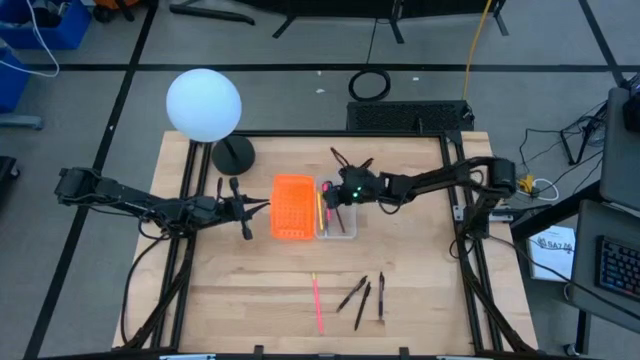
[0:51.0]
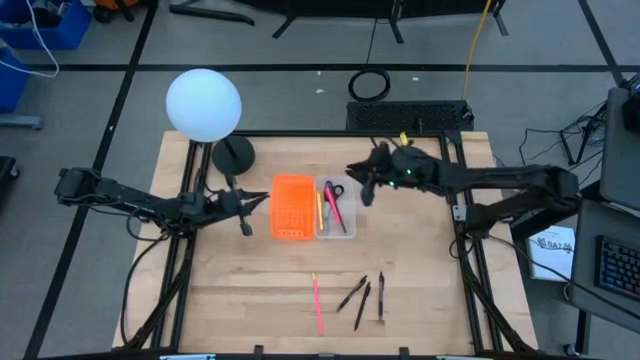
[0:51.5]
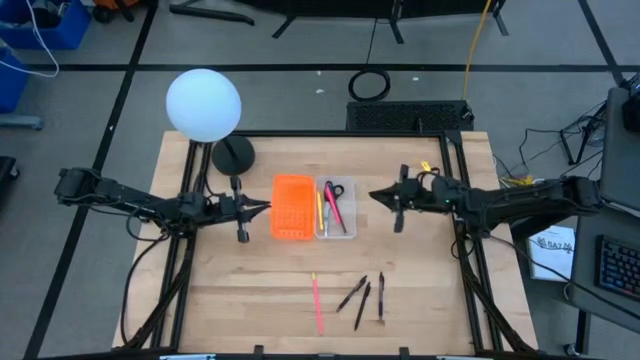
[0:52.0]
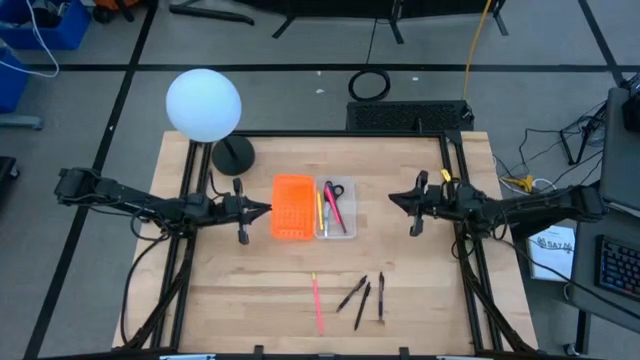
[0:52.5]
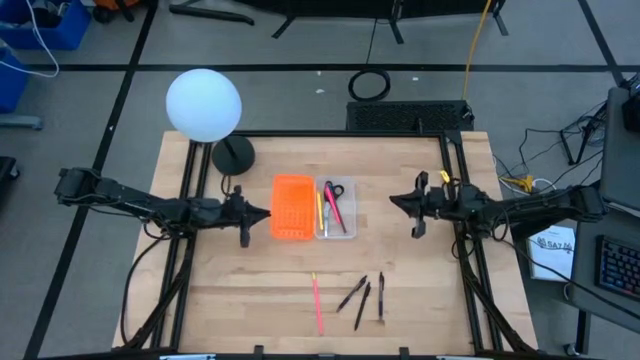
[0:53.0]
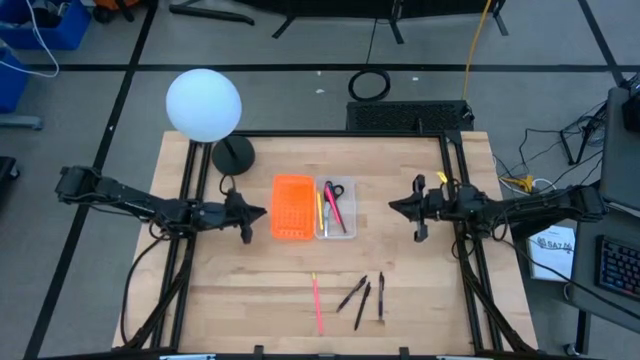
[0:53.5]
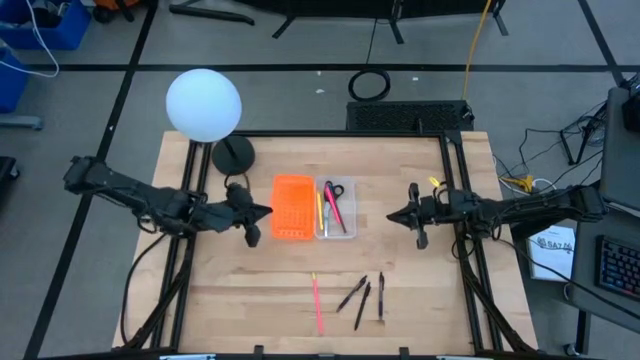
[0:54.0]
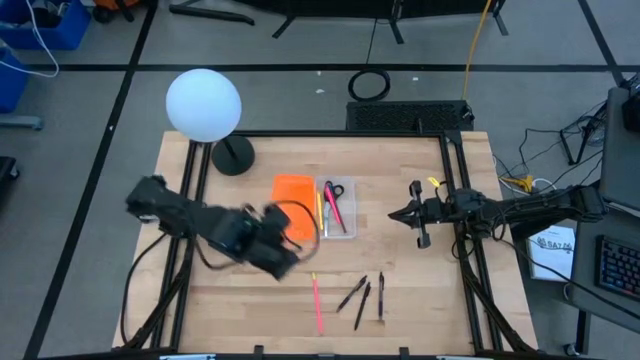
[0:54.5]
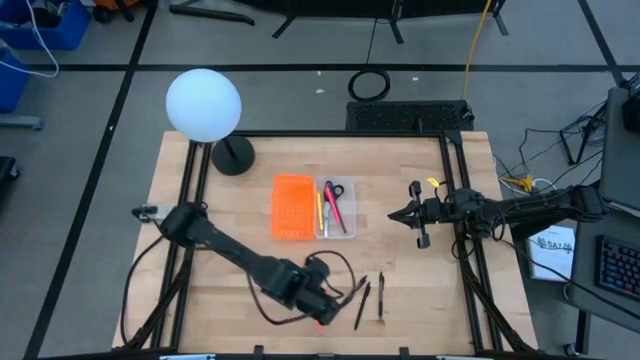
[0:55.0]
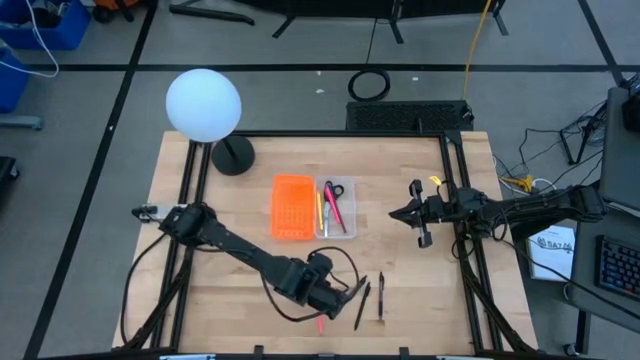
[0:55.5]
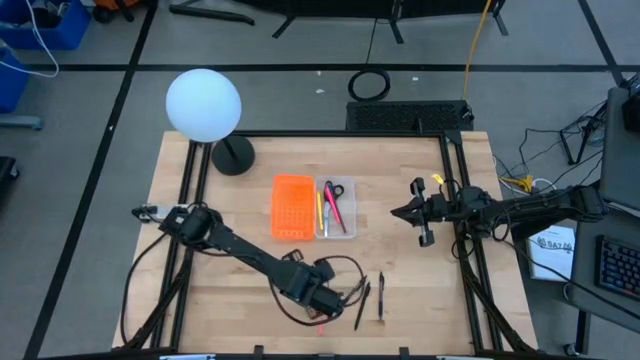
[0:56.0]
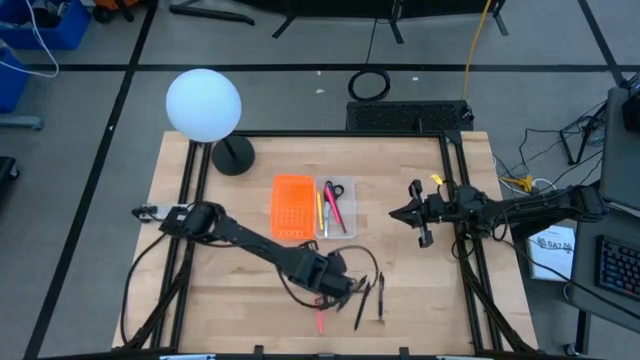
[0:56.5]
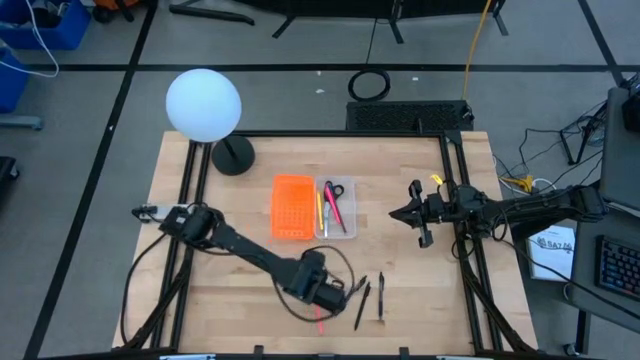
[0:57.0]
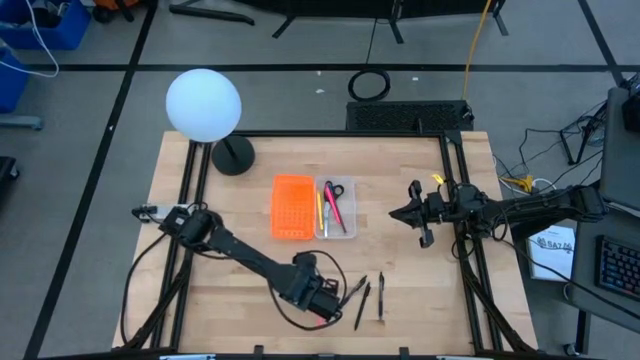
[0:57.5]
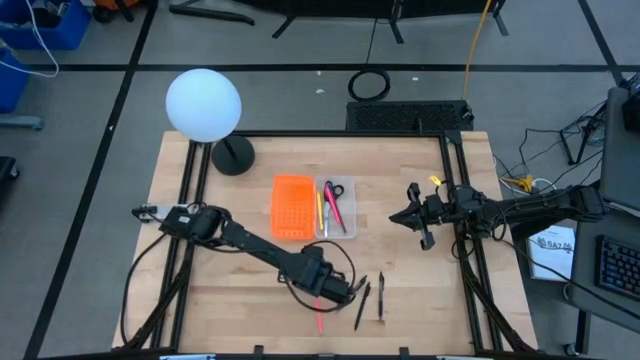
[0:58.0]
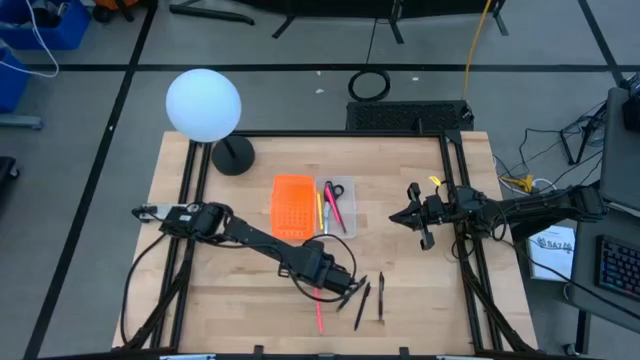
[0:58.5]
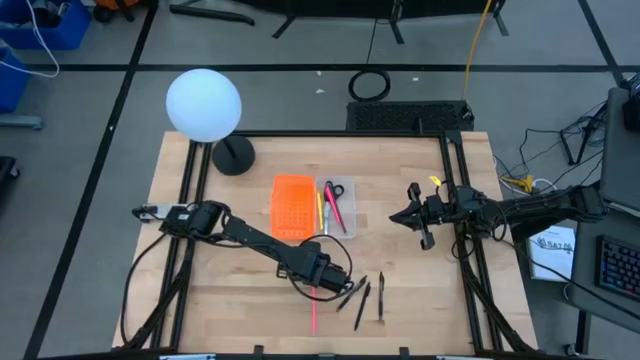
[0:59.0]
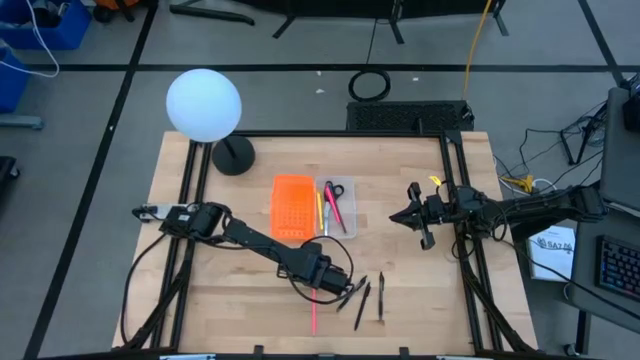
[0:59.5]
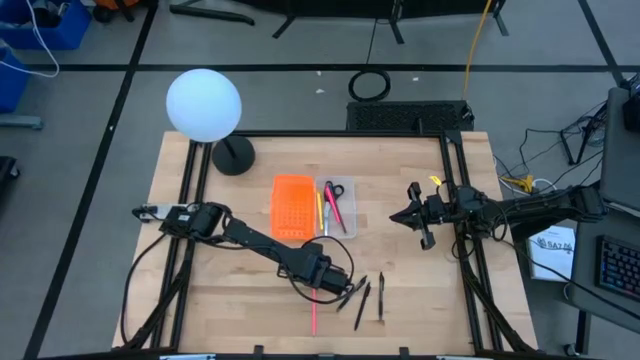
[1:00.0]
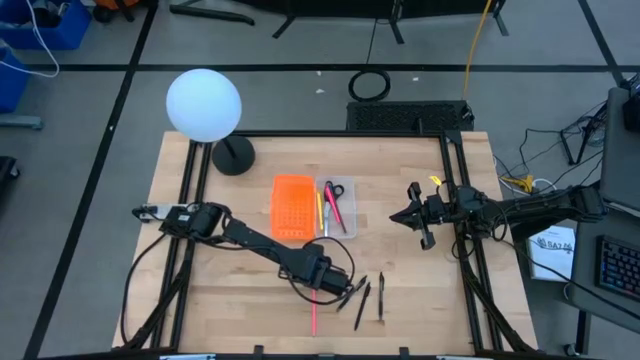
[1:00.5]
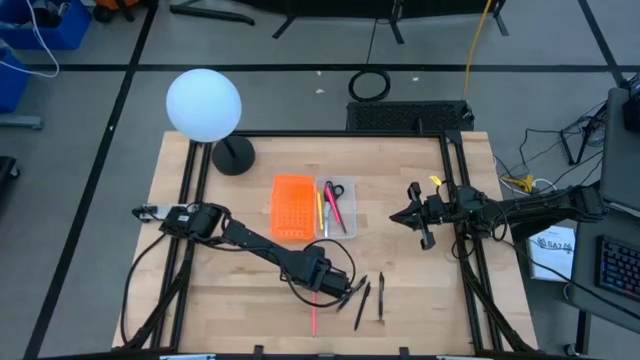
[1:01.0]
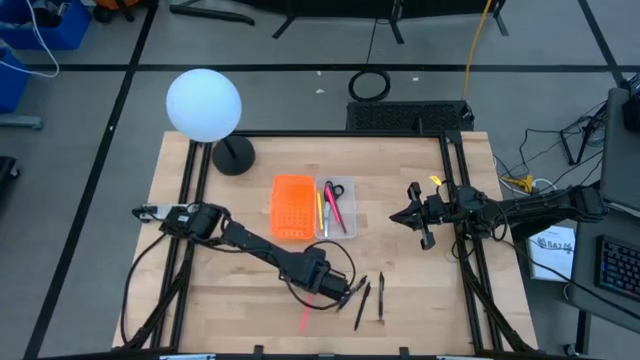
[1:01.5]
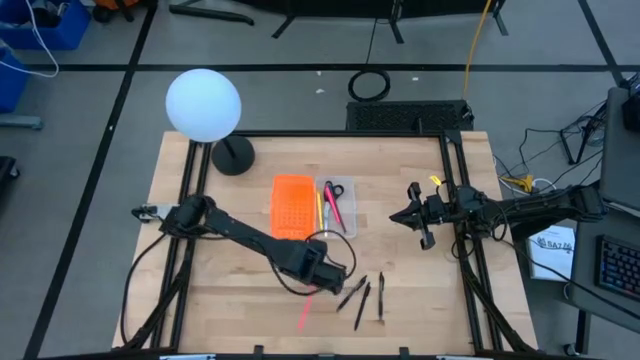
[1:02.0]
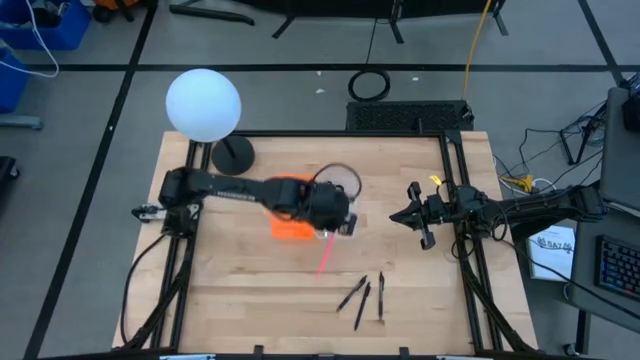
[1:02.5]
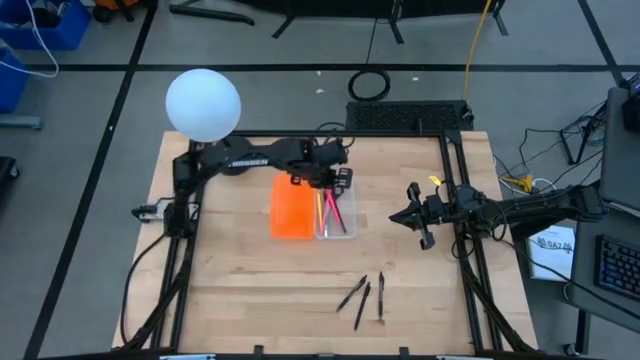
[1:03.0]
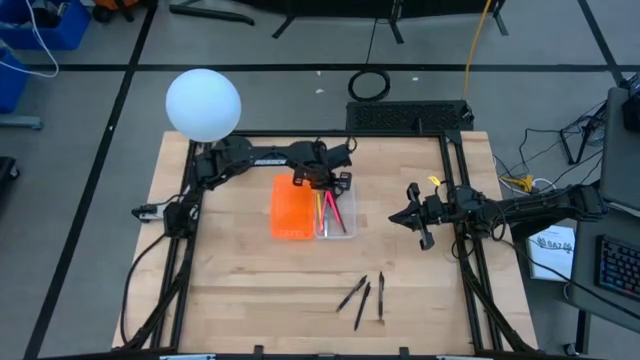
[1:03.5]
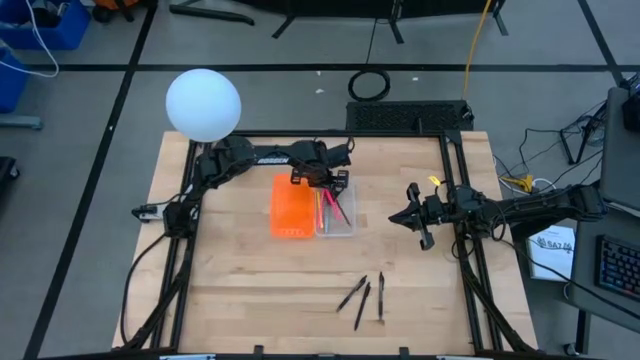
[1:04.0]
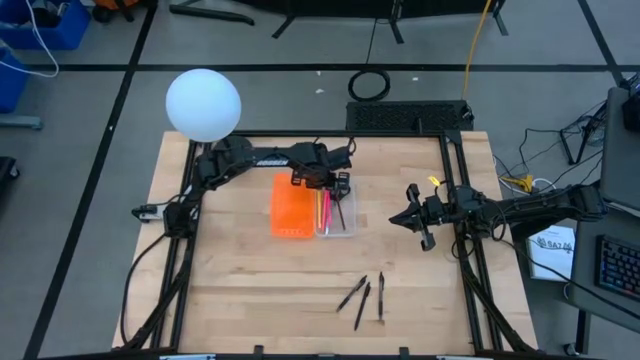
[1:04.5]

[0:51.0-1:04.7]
Task: Pick & place school supplies into a supply box
Put the pink pencil into the orange supply box

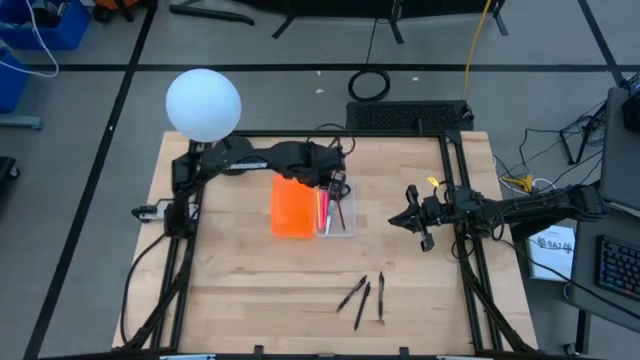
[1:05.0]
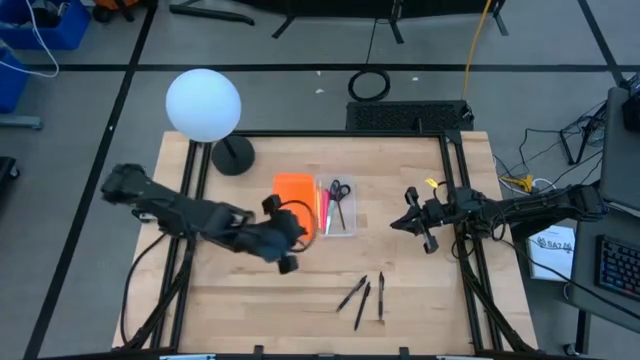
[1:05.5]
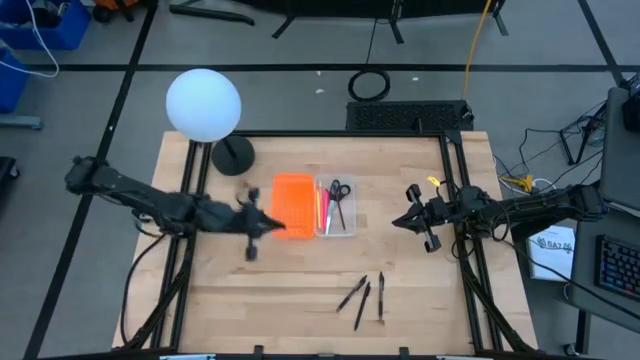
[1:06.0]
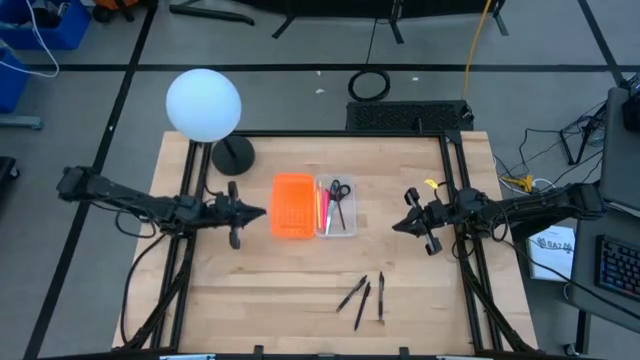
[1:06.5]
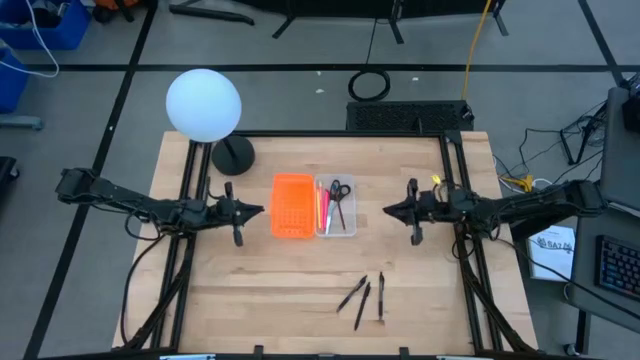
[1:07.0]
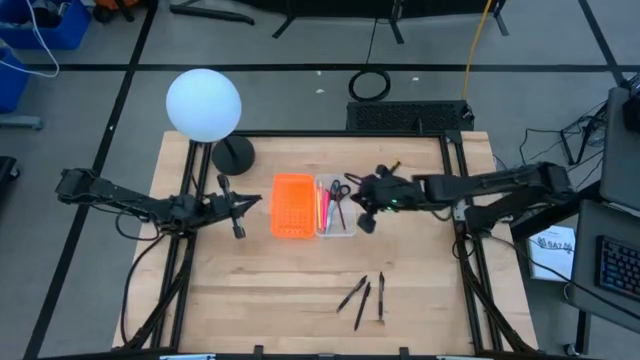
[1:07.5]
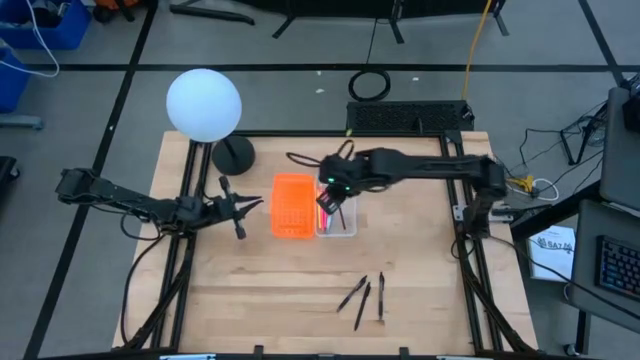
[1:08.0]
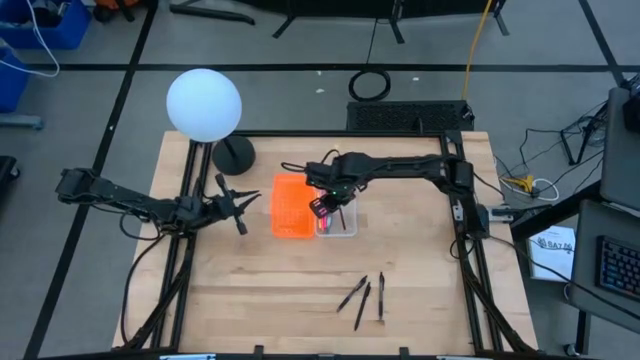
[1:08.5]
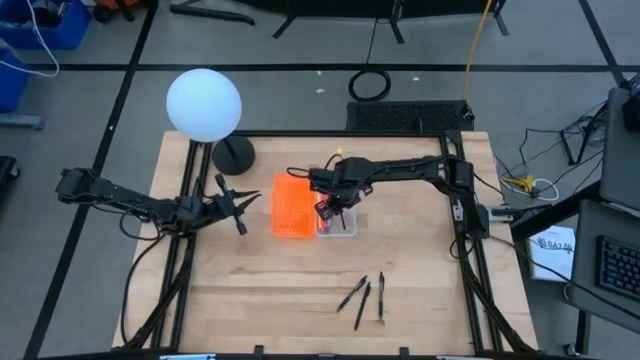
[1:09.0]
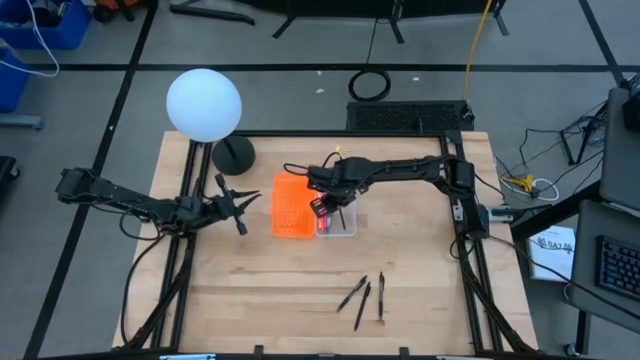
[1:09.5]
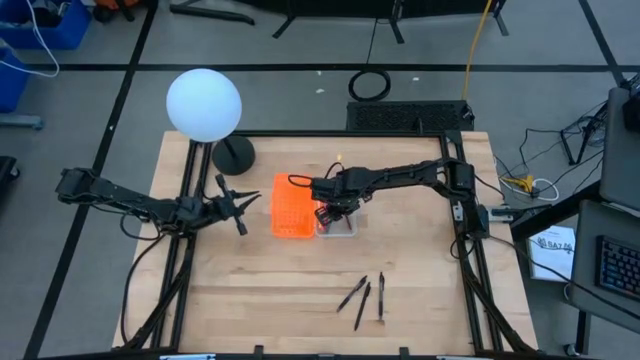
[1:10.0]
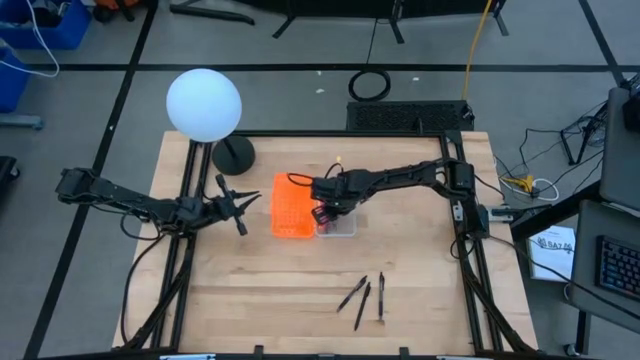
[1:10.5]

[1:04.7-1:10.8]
Adjust the brown pencil in the orange supply box

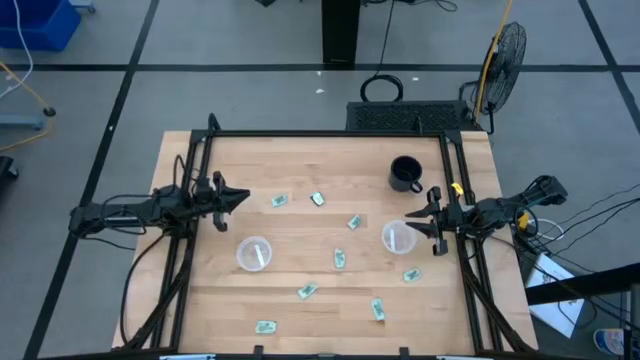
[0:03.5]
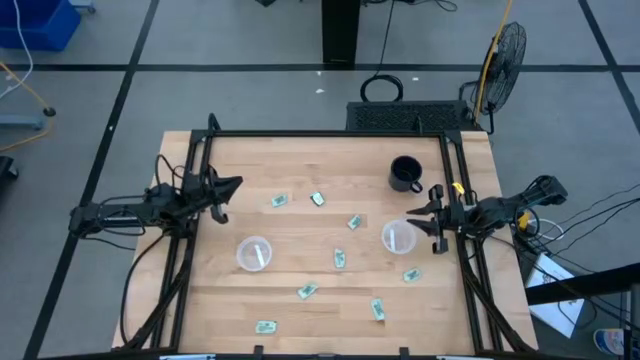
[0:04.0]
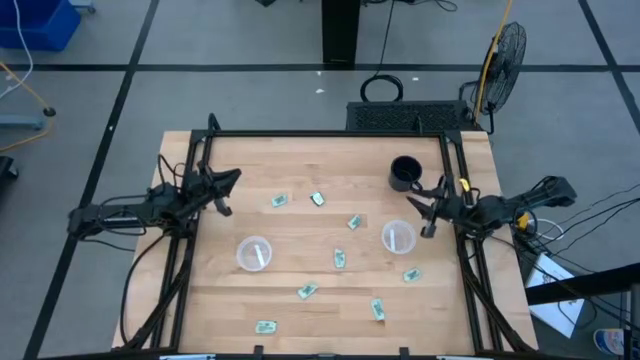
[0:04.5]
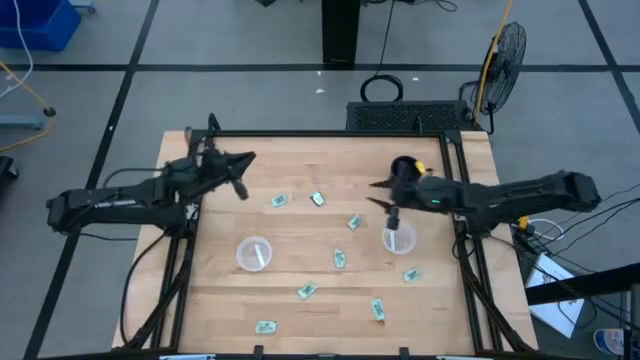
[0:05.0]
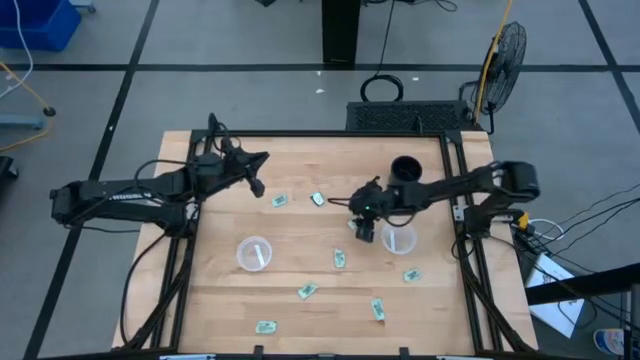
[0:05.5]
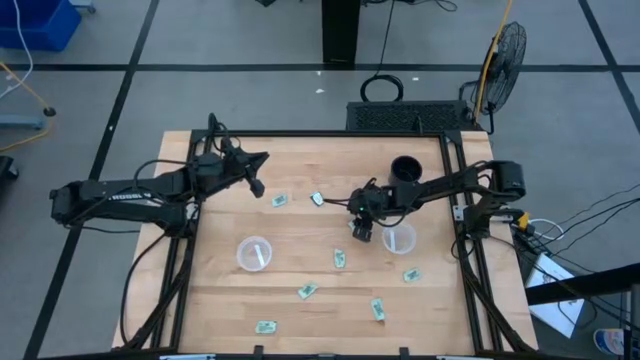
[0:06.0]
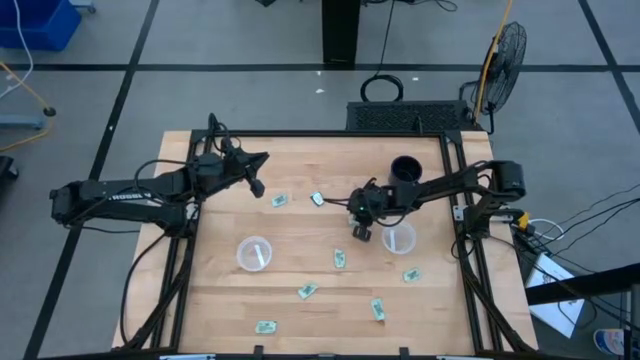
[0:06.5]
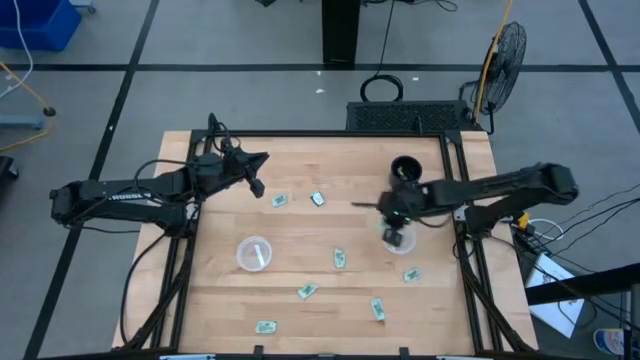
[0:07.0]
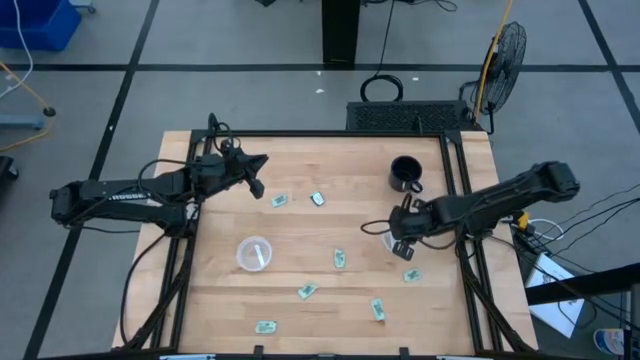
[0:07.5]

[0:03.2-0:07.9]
Task: Pick and place items into bin
Put the white stevia packet into the right transparent bin
